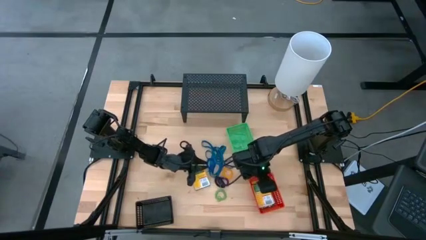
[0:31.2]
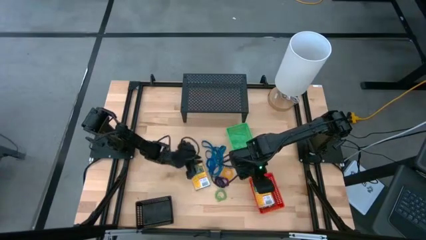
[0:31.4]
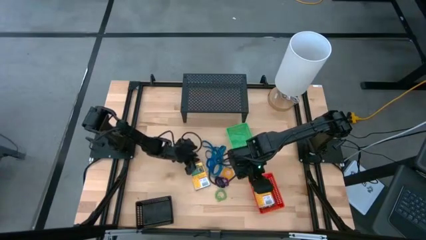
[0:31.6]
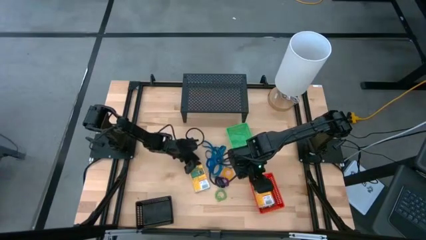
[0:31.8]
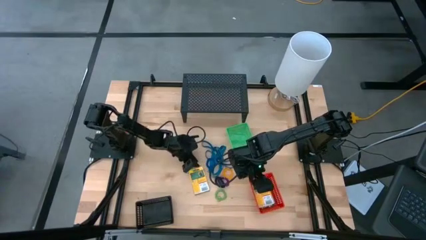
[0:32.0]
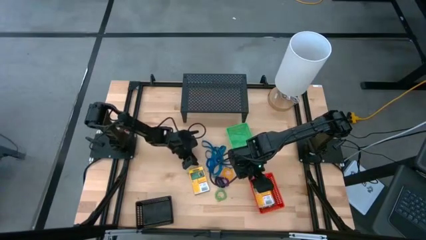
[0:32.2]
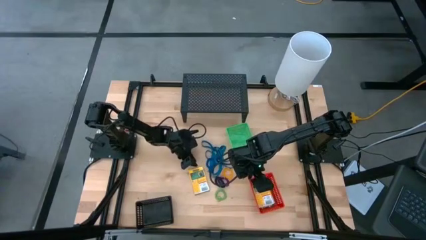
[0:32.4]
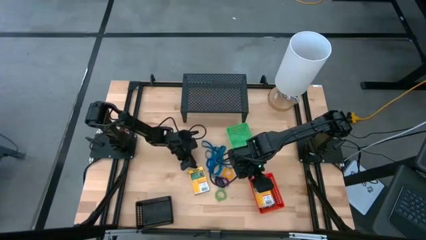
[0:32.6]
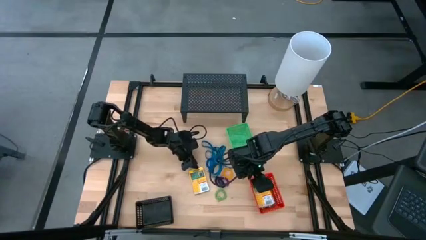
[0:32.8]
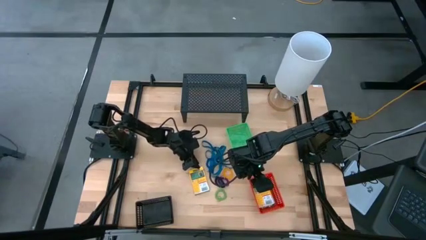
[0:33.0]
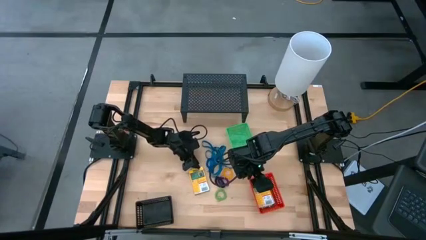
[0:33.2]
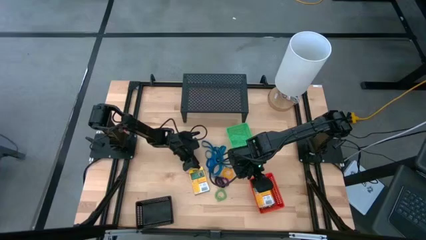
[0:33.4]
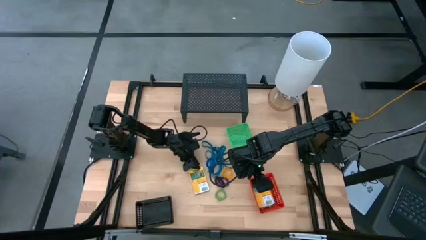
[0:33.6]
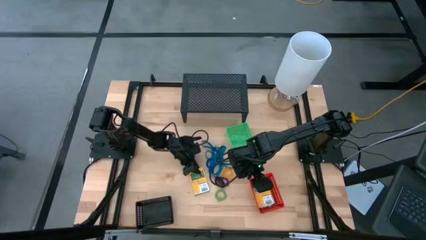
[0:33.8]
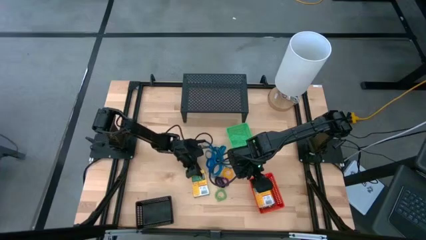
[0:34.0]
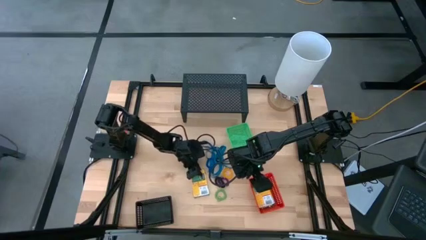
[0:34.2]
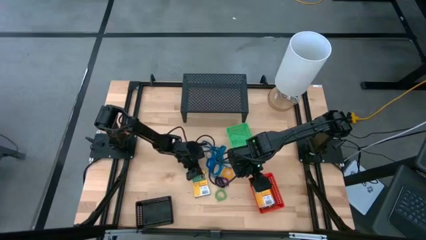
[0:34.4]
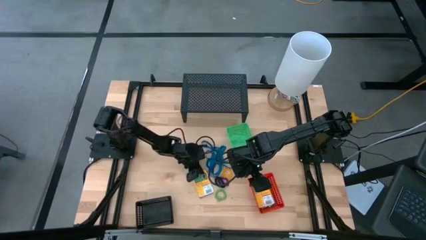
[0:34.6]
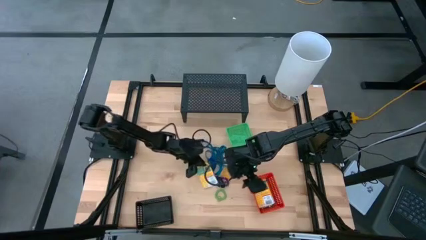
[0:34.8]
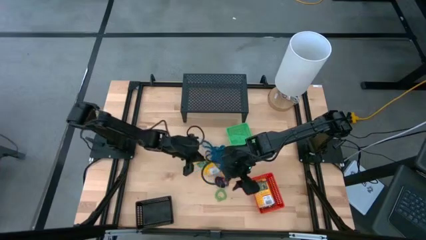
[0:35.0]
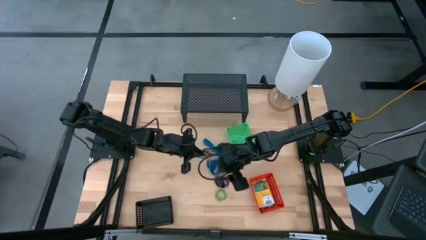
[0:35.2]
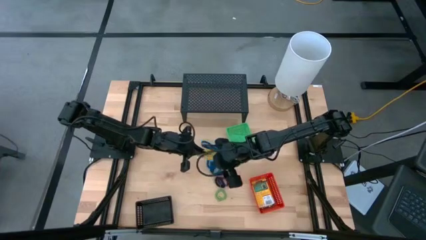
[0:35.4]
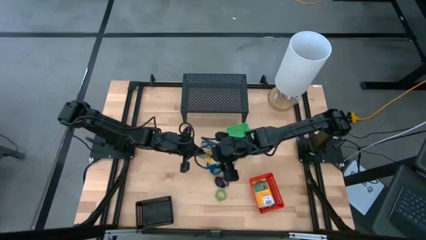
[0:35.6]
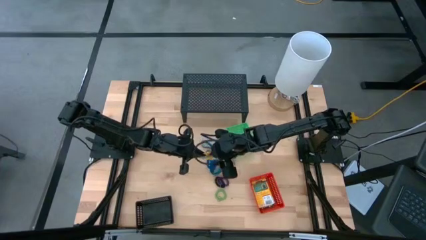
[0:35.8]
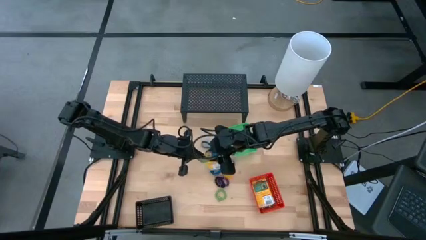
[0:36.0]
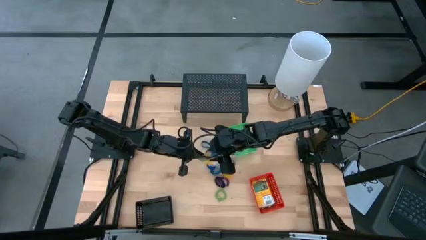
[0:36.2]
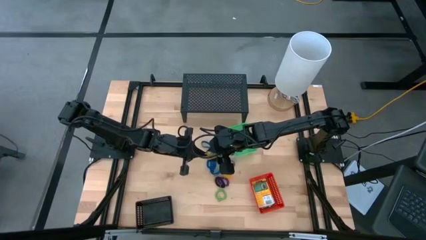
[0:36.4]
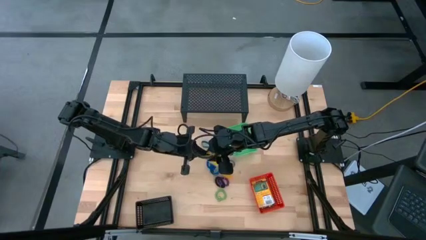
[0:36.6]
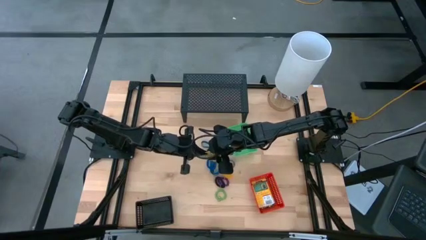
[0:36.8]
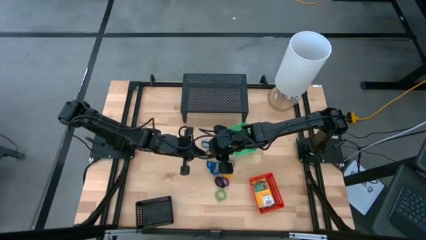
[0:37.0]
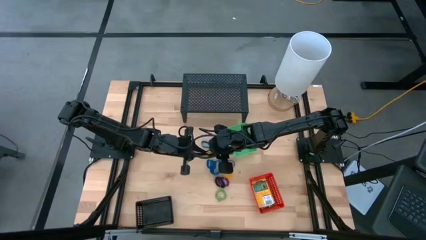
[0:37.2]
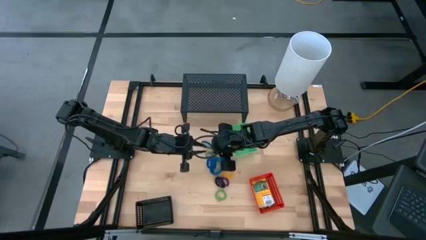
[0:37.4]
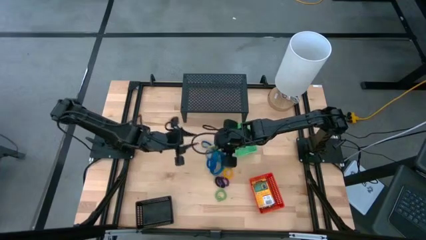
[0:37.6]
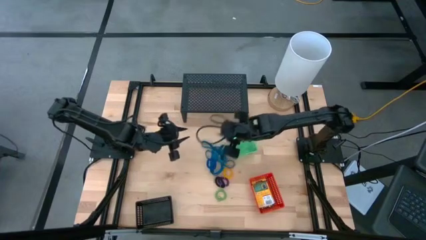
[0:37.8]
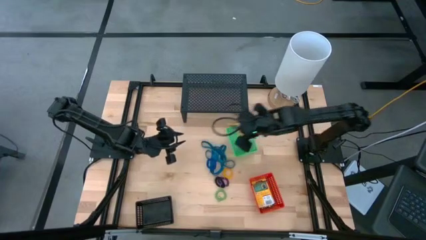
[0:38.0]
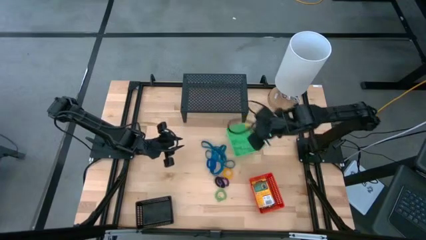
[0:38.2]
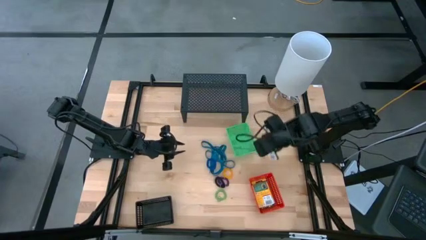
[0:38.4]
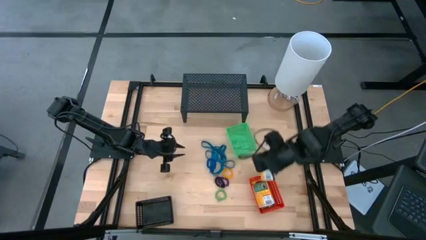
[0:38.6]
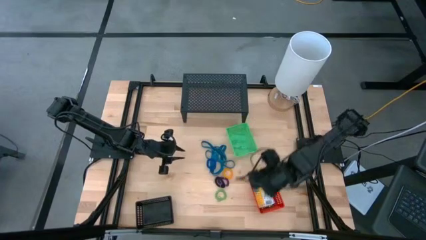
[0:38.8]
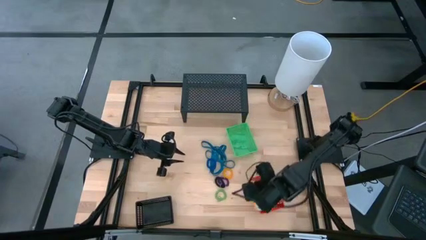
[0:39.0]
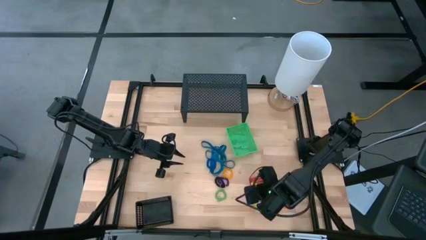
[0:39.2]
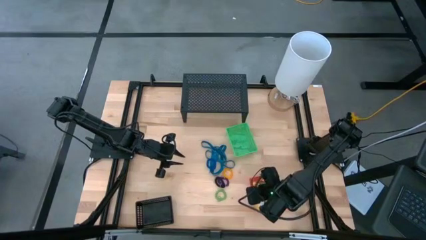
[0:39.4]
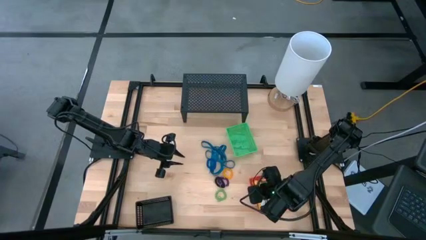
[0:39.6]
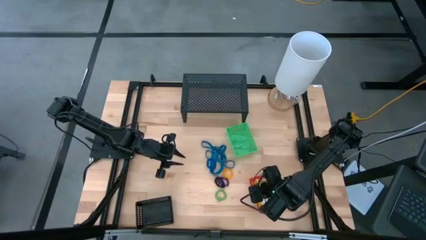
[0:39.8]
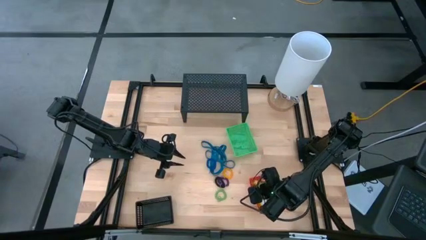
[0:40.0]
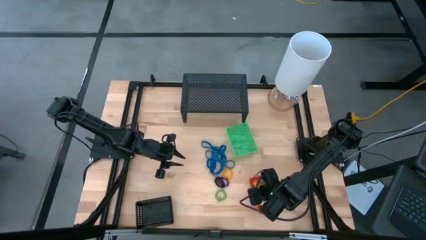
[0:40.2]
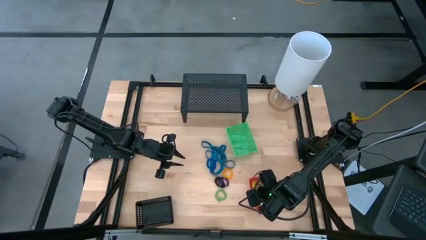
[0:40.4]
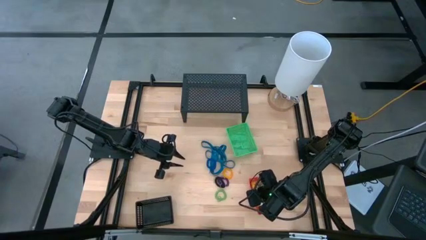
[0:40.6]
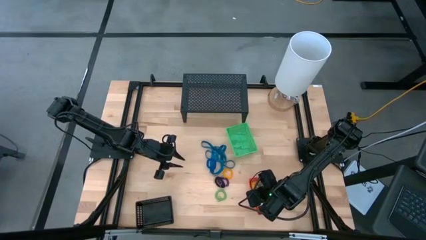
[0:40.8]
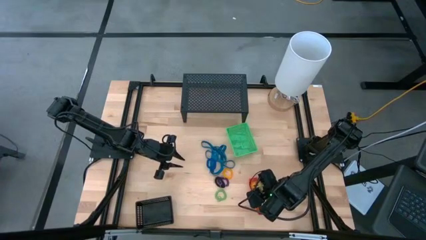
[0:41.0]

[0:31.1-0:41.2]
Task: Pick & Place Office Desk Supplies
Put the crayon box into the red basket

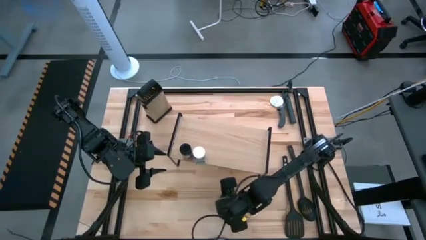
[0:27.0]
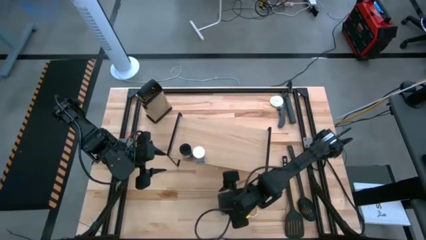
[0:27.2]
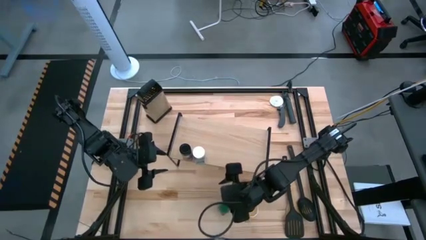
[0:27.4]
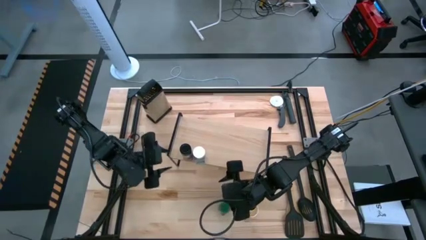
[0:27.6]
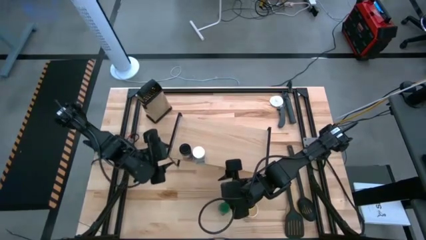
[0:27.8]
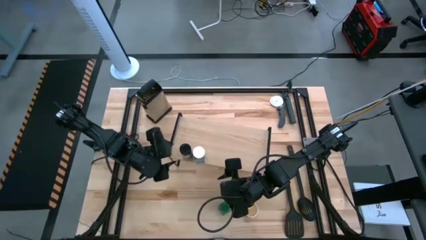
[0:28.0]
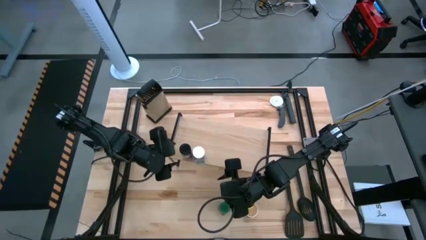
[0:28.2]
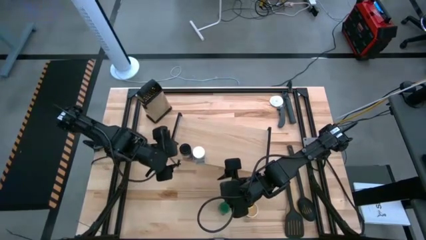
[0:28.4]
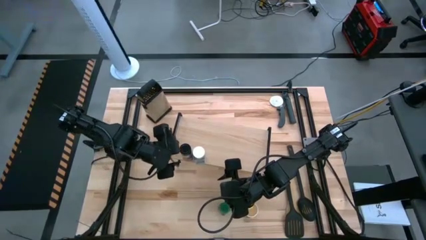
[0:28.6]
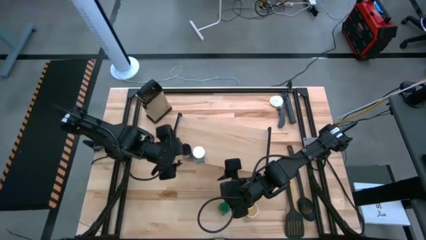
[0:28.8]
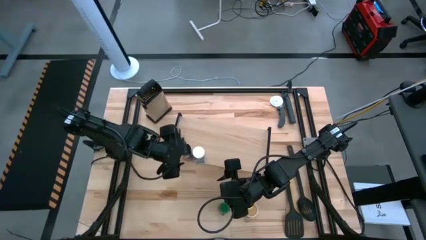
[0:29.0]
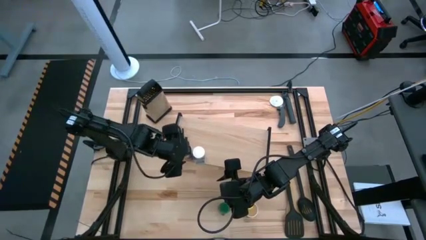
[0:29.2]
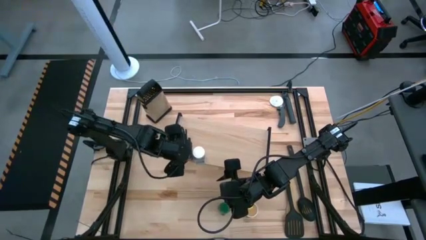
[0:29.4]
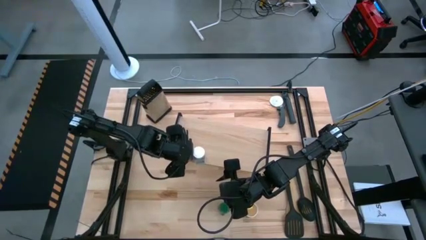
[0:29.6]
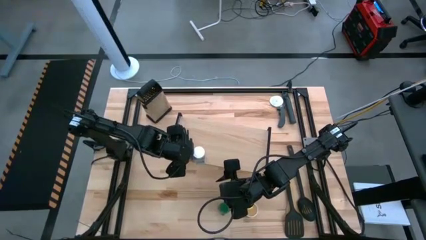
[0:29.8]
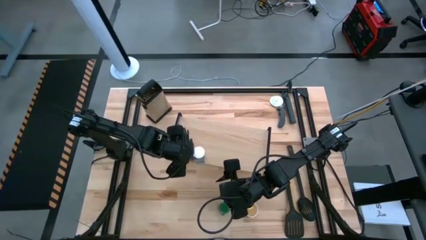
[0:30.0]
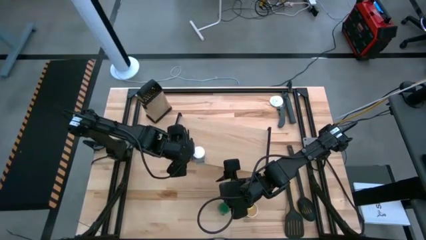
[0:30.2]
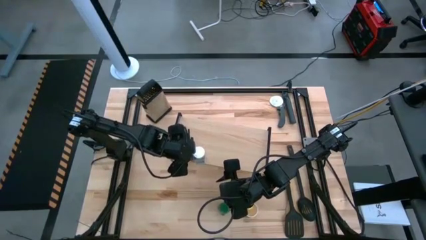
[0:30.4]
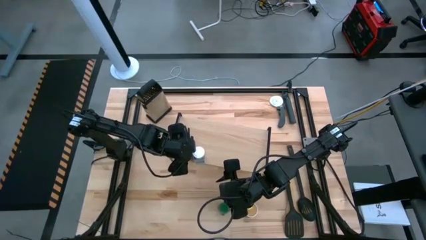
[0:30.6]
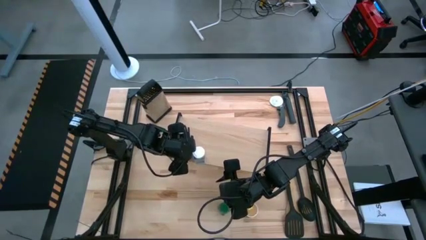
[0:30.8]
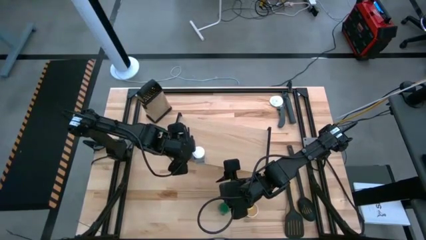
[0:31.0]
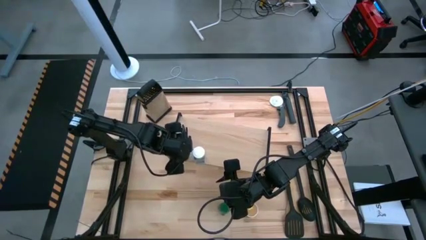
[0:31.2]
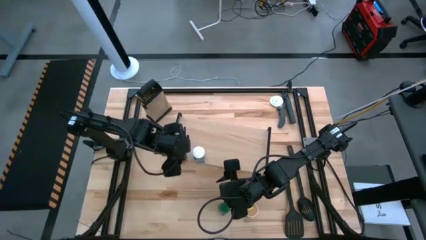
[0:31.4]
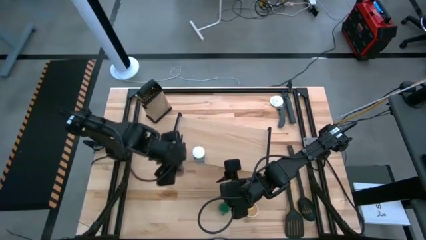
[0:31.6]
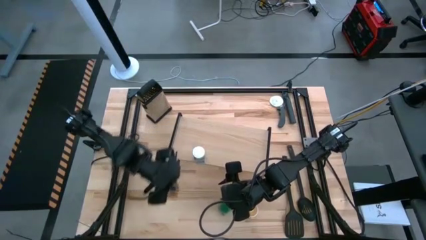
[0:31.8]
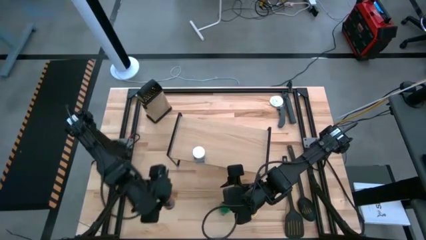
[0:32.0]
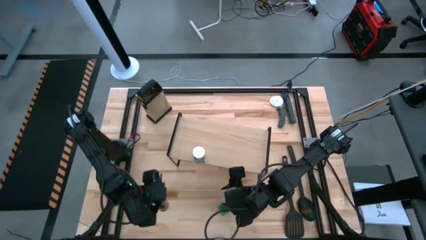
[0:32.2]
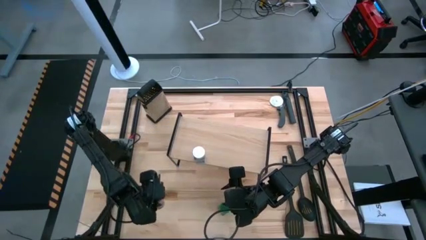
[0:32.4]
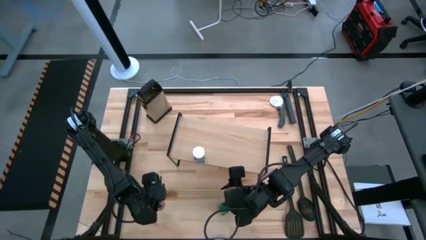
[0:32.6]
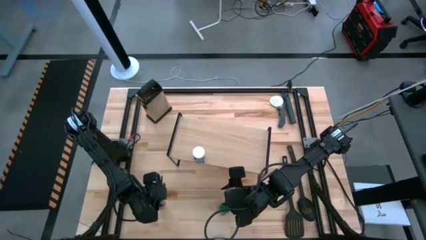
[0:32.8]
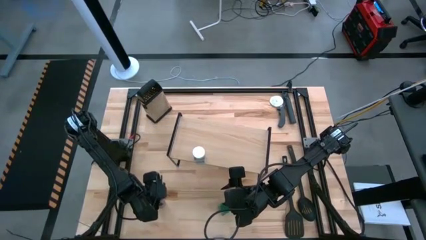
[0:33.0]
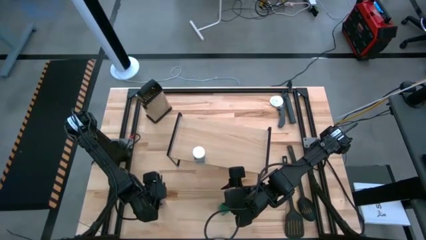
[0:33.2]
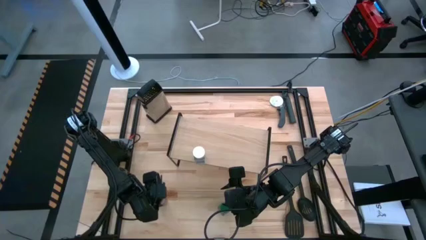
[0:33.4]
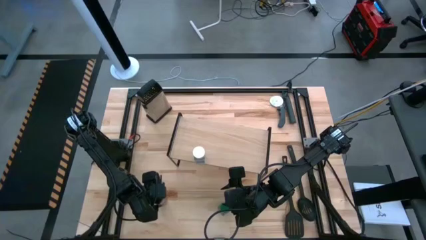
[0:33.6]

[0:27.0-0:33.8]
Task: Shelf spices
Remove the black seasoning bottle from the shelf
